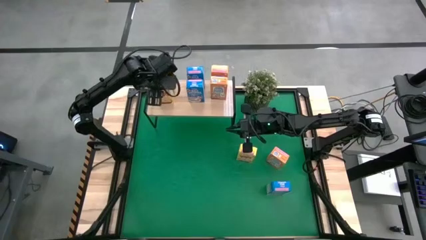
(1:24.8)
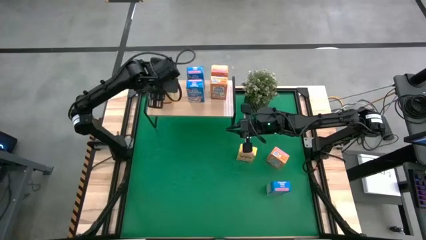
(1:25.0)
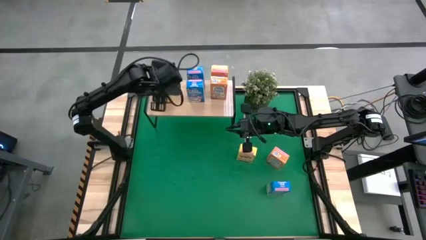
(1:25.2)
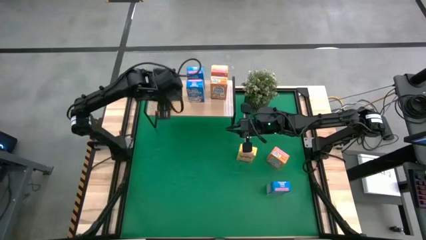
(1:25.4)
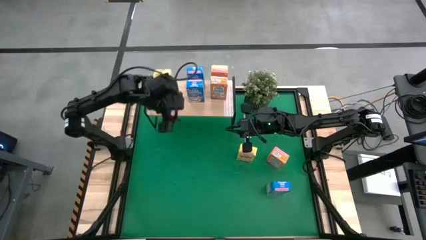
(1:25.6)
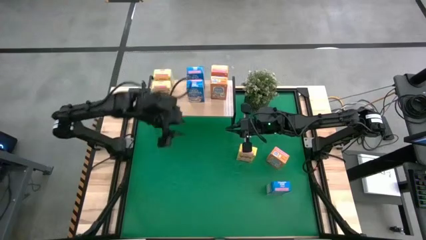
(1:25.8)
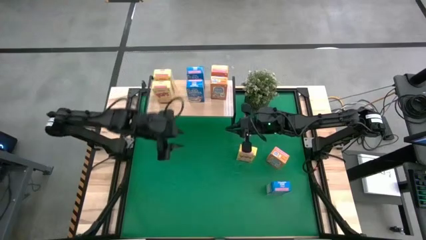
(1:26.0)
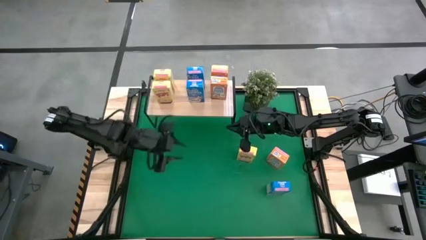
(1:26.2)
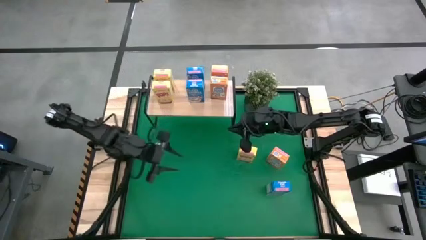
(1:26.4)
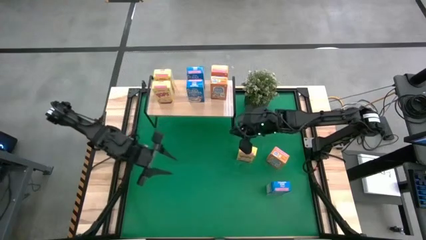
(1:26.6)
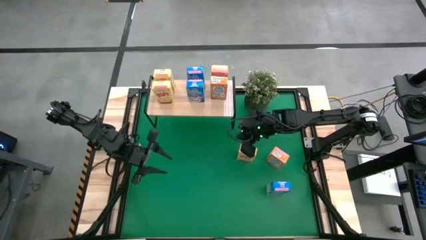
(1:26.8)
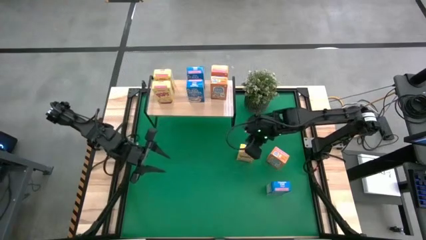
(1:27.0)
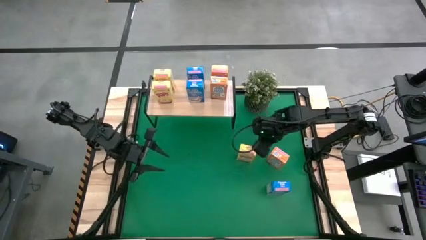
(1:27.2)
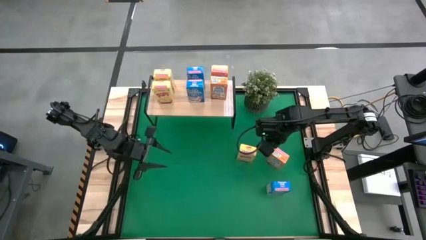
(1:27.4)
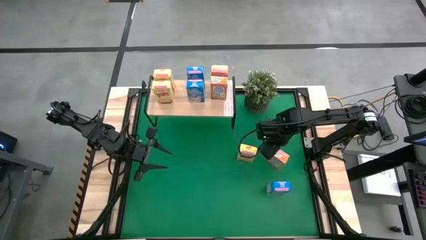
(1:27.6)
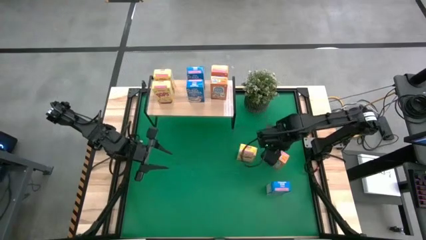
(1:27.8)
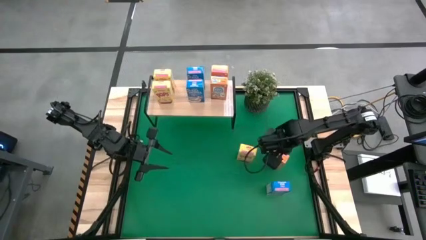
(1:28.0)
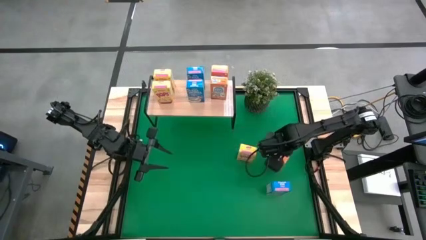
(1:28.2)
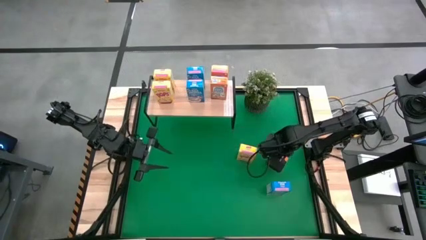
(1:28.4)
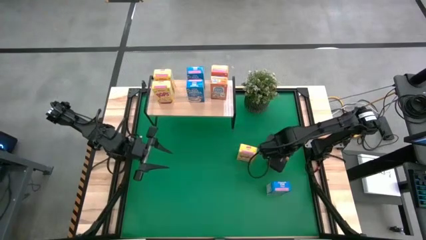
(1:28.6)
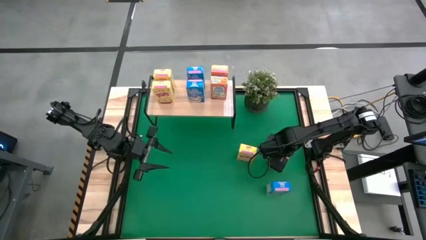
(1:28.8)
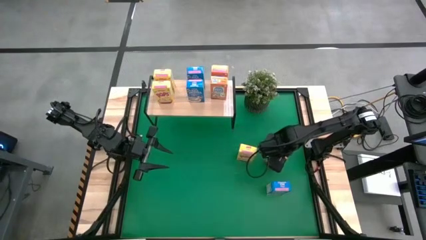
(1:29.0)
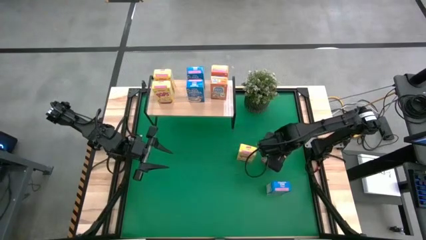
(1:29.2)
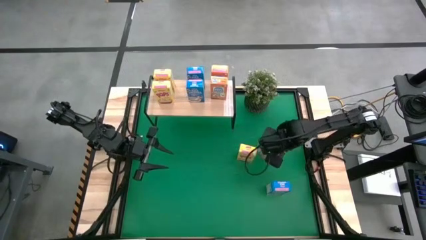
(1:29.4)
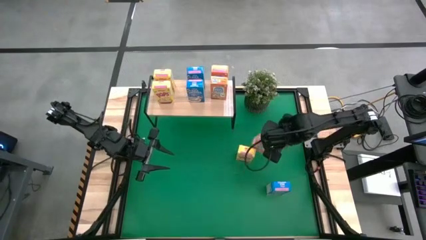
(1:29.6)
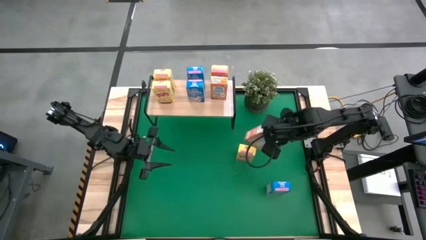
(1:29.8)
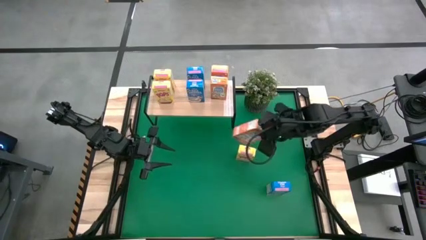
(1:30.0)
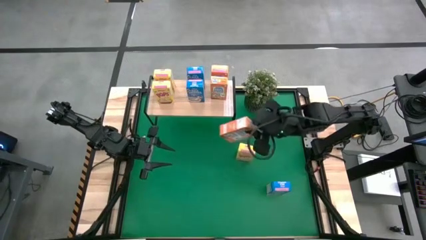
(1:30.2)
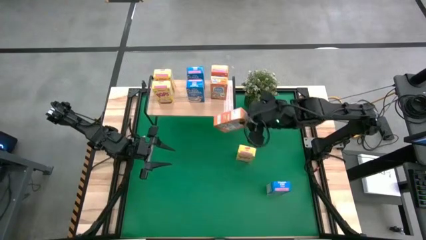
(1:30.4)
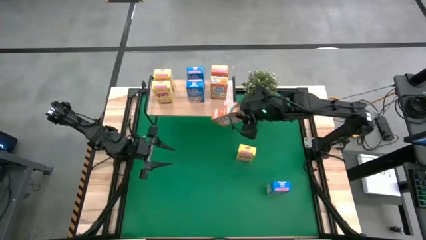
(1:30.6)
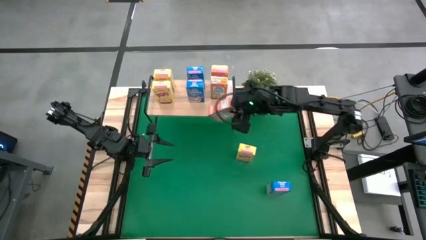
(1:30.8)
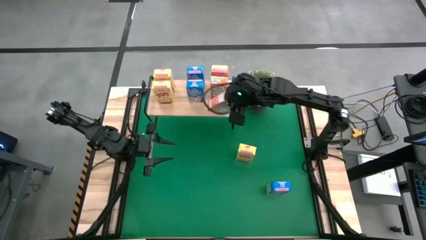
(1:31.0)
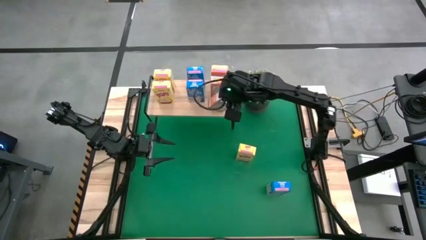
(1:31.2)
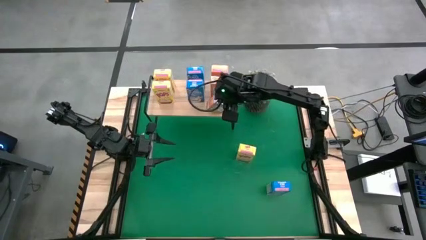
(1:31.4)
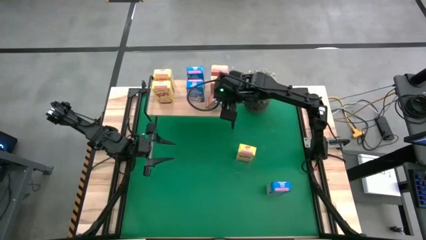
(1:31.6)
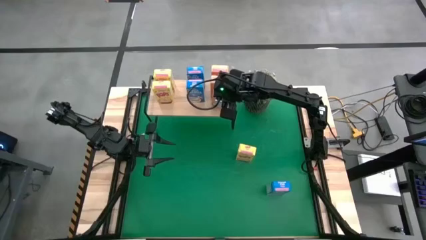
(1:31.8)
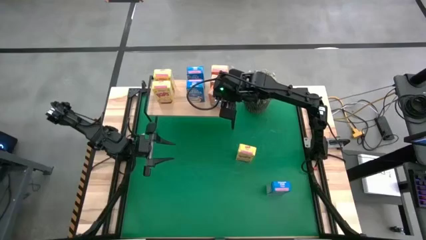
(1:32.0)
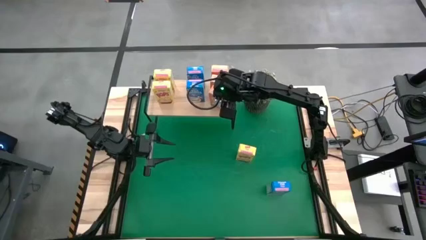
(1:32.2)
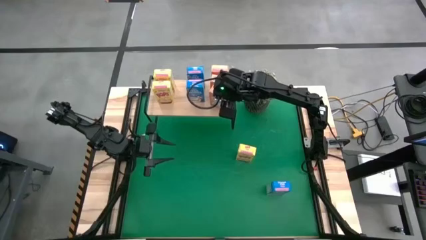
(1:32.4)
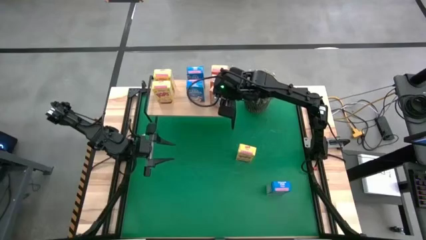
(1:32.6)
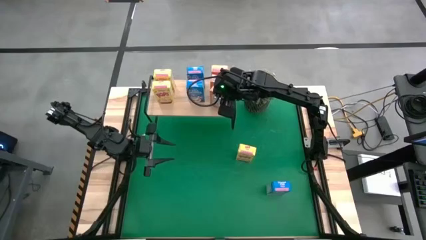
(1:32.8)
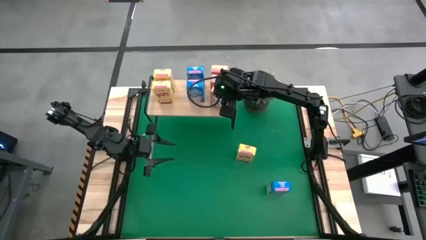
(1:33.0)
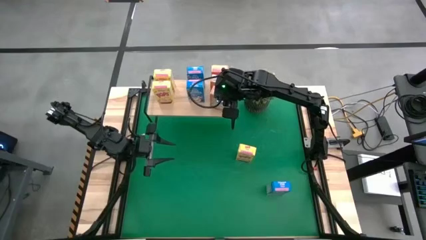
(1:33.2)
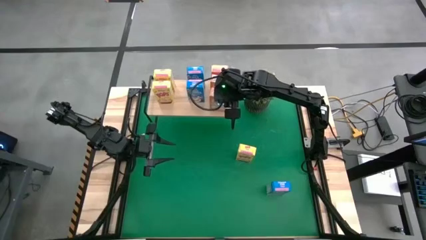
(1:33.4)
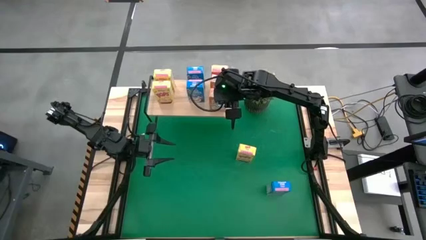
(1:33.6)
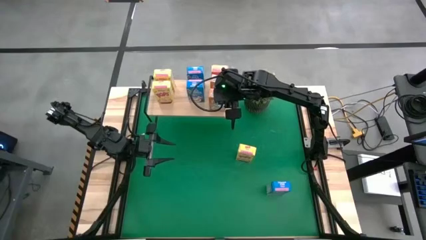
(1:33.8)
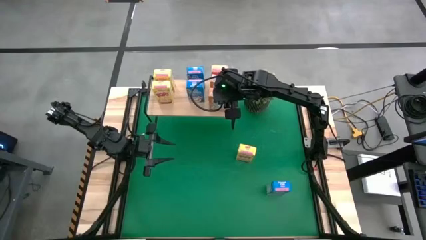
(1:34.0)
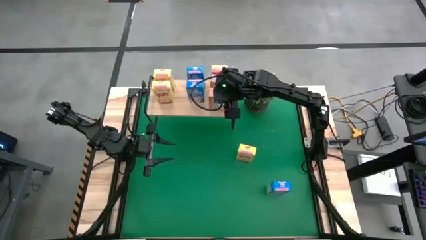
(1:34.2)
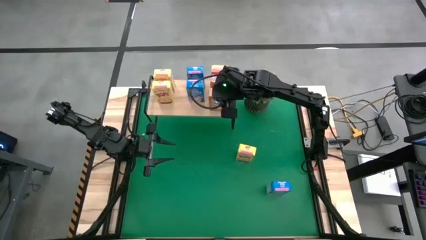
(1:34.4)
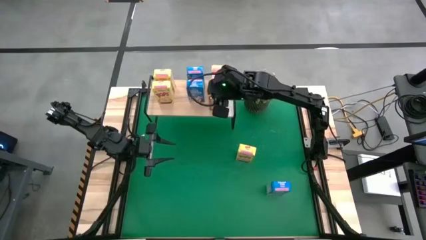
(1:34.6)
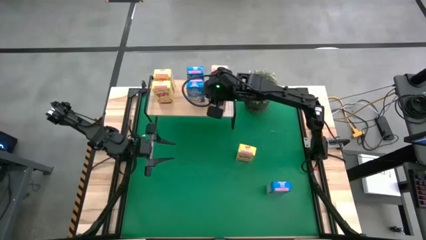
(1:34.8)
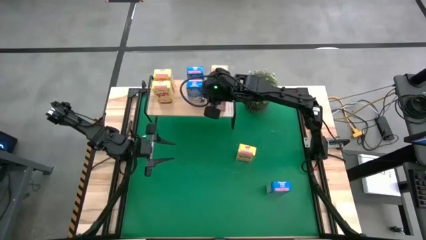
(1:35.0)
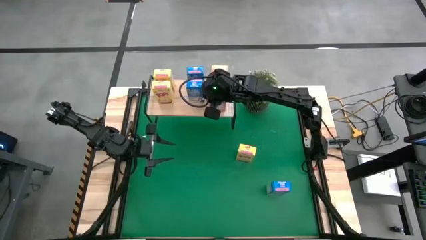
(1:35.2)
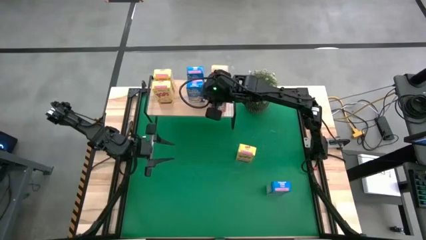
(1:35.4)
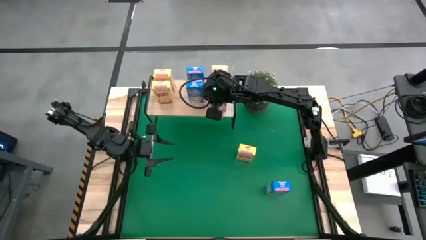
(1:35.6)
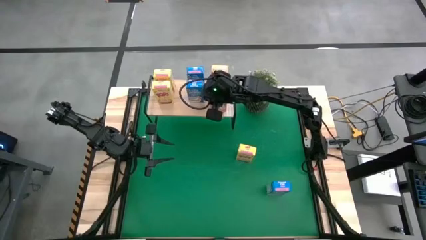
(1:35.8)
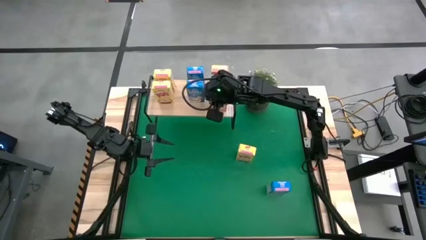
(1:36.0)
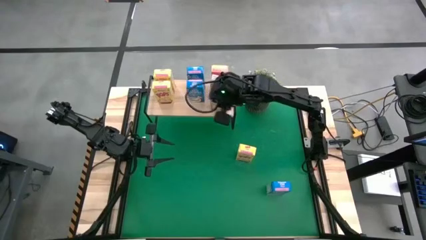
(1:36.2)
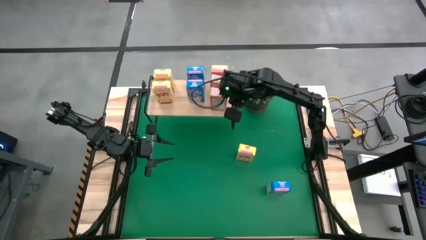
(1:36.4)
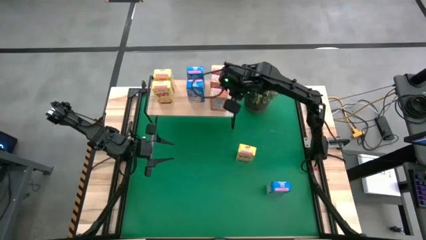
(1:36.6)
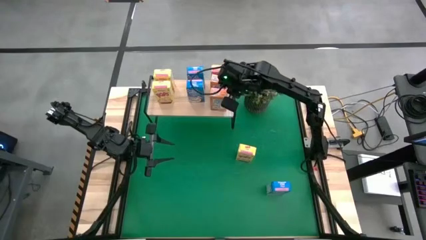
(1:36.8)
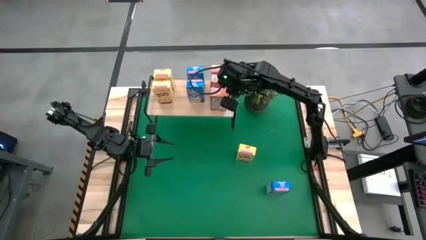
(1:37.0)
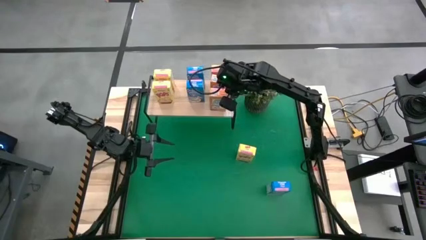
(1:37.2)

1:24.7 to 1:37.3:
Task: Stack cereal on shelf
Put the orange cereal box on the shelf

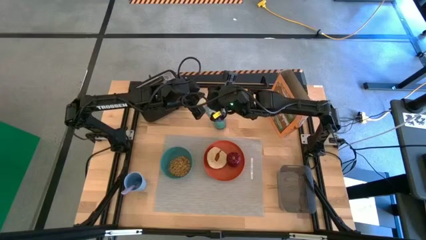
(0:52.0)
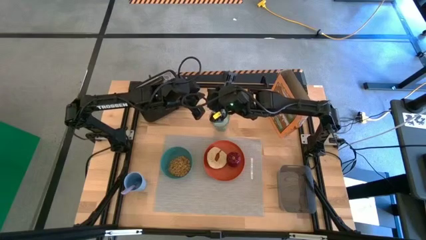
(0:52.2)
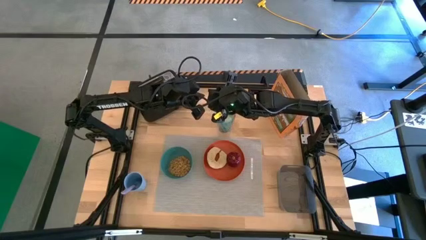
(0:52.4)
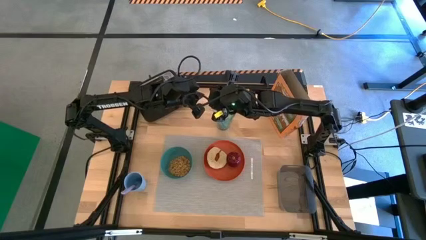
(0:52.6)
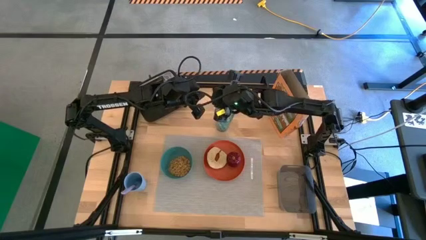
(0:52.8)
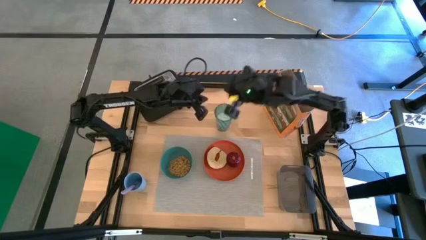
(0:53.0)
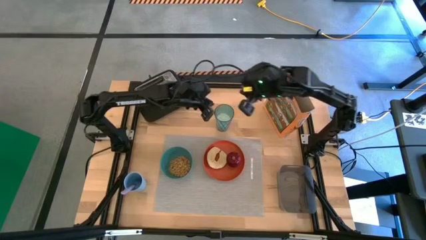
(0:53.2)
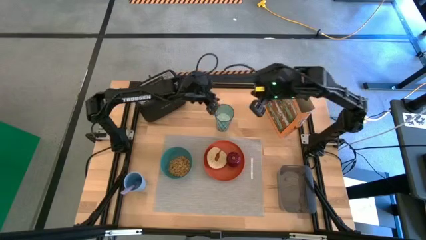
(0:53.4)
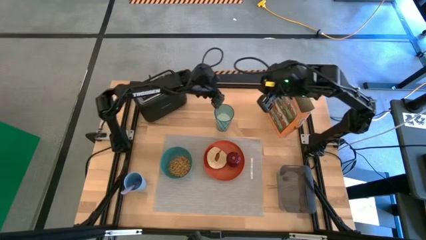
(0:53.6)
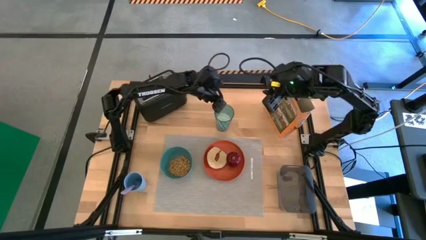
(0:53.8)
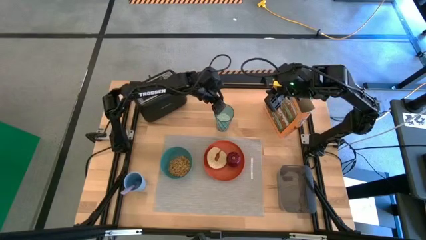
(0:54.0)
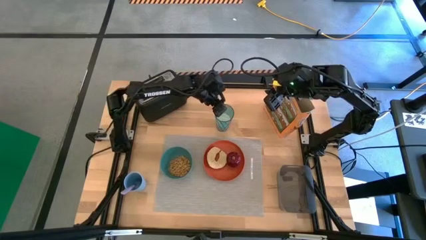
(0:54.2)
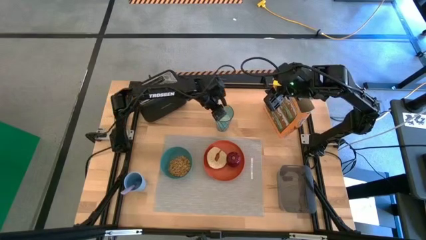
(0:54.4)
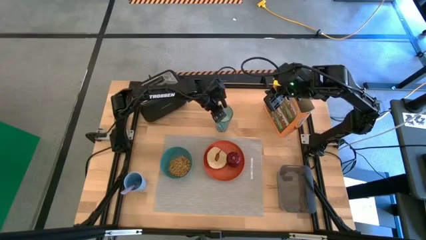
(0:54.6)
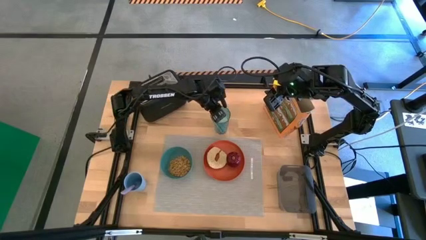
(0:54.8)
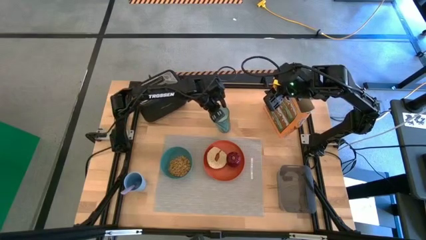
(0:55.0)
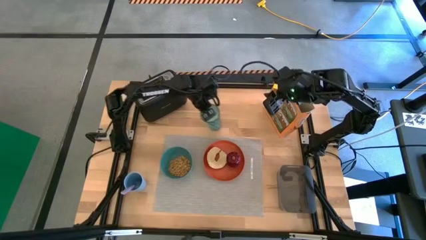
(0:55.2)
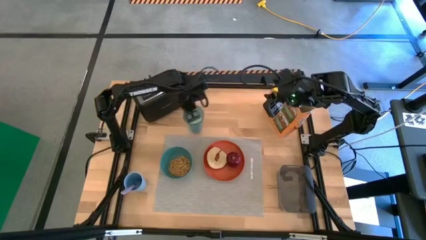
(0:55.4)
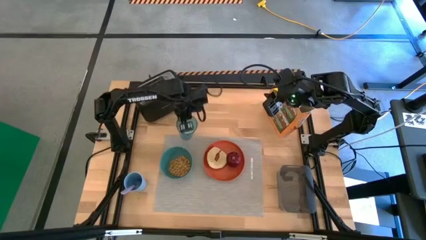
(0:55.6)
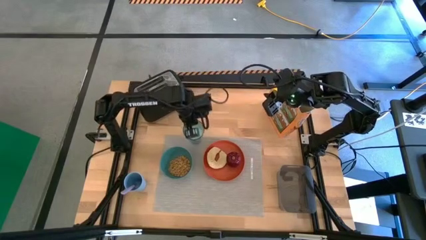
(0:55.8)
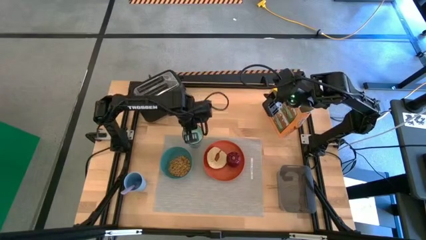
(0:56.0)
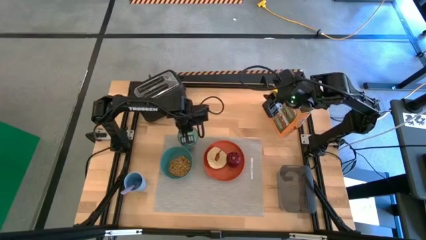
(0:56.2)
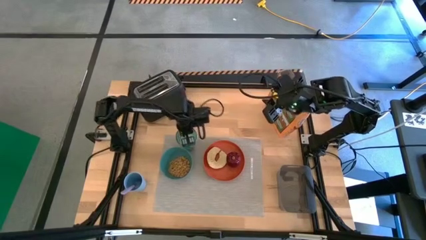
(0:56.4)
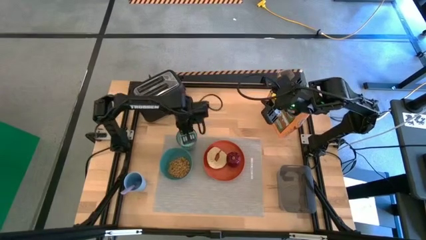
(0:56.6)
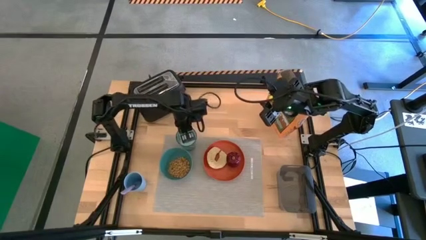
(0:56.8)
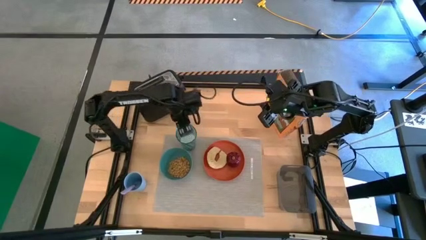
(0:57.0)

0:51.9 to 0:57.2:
Task: Arrange a breakfast setting
Put the cup of rice into the top side of the tablemat
